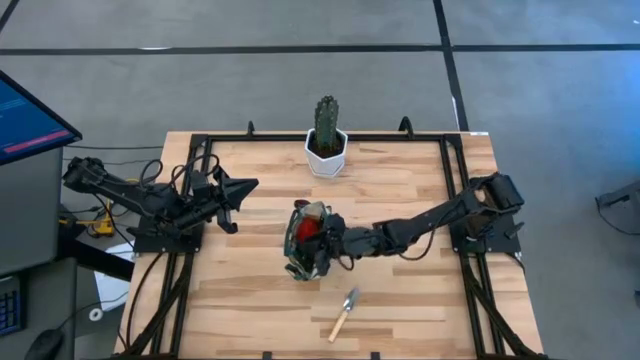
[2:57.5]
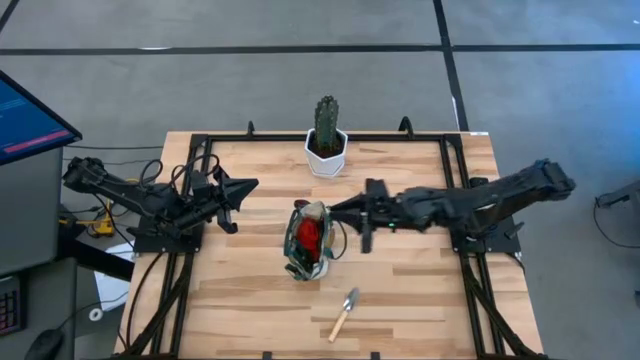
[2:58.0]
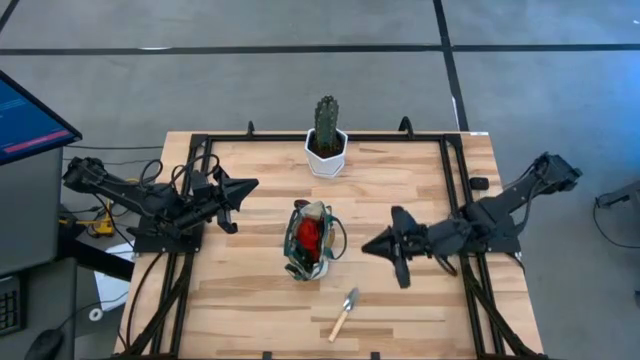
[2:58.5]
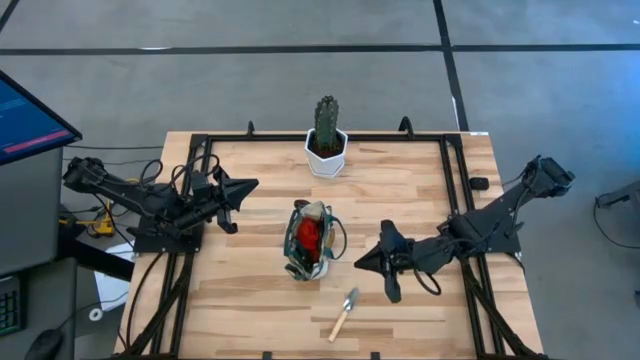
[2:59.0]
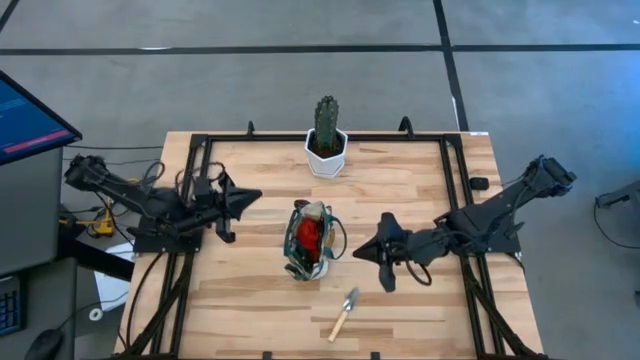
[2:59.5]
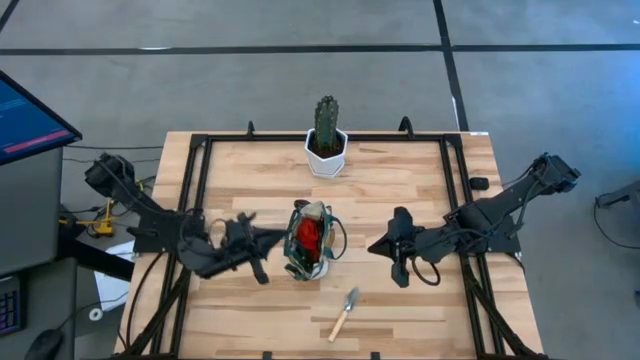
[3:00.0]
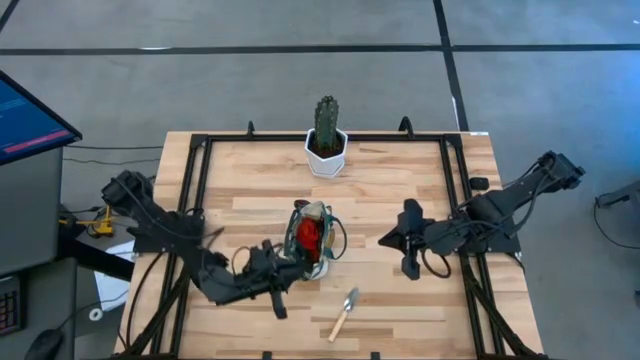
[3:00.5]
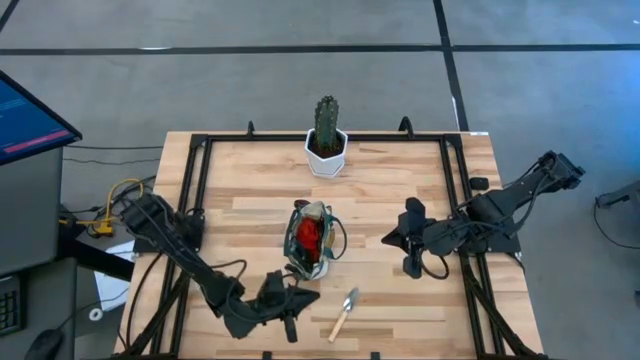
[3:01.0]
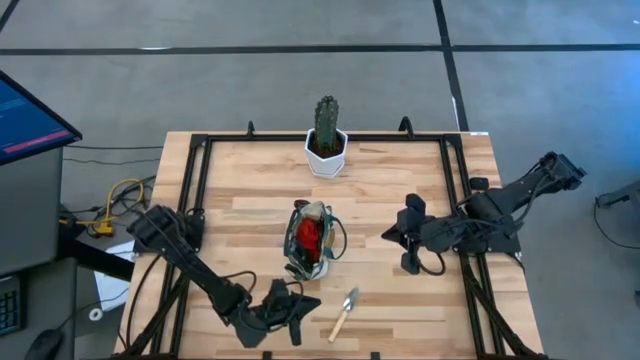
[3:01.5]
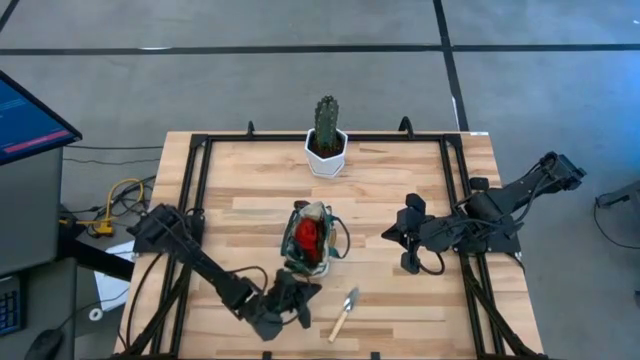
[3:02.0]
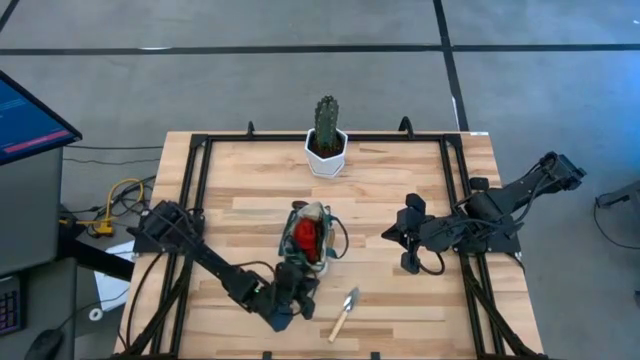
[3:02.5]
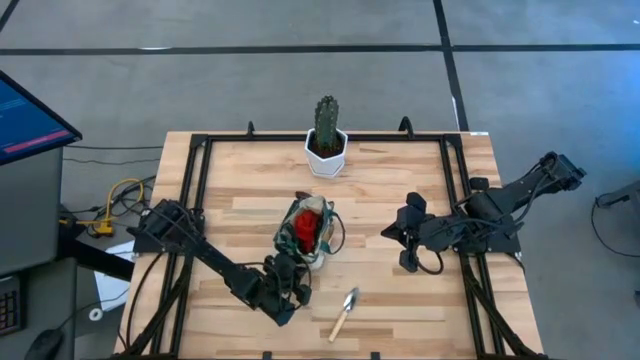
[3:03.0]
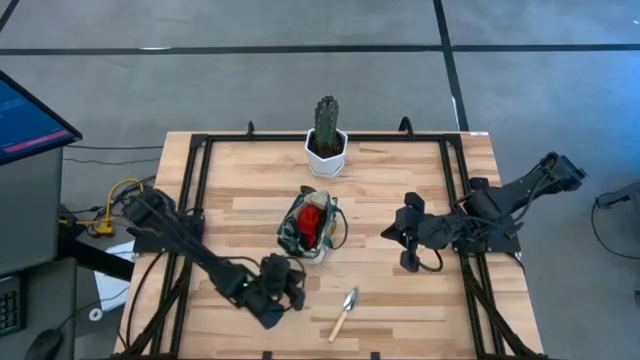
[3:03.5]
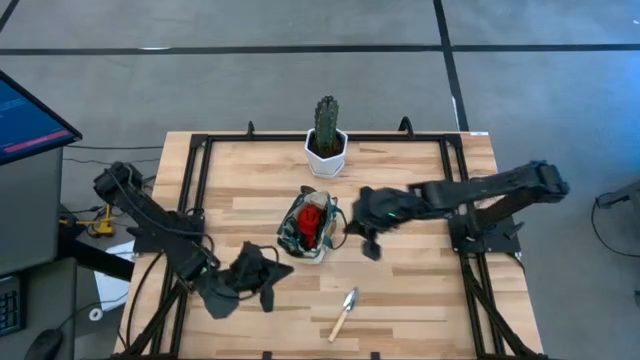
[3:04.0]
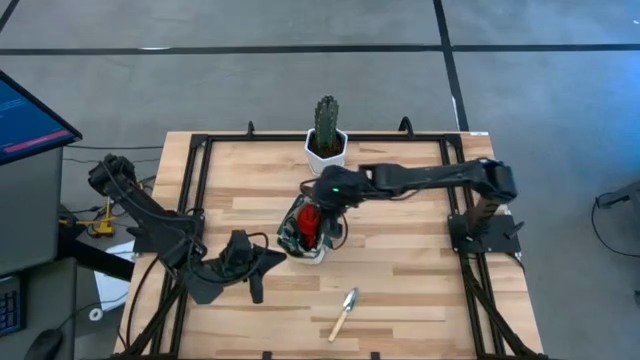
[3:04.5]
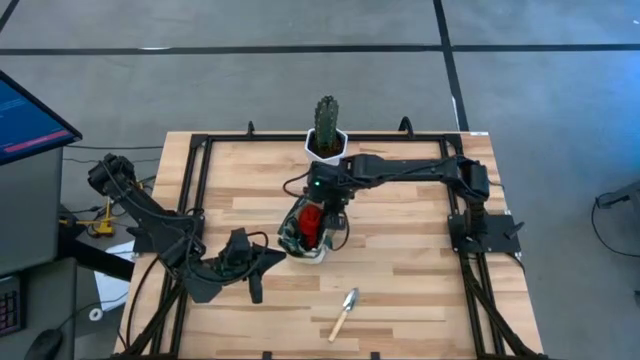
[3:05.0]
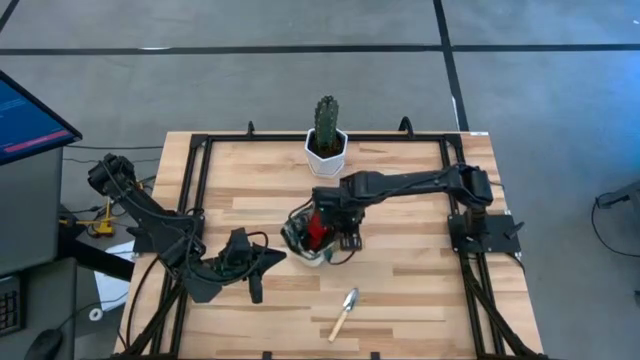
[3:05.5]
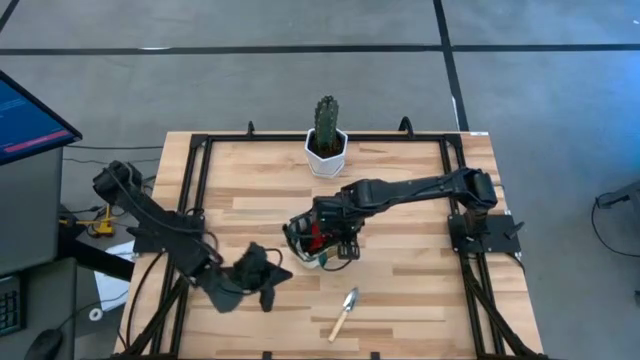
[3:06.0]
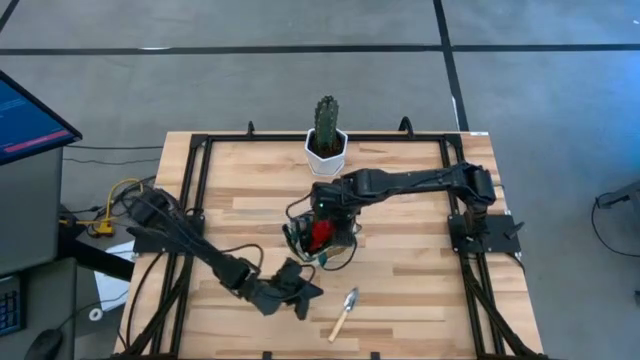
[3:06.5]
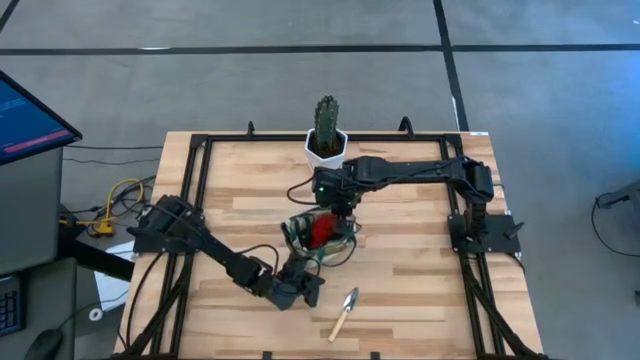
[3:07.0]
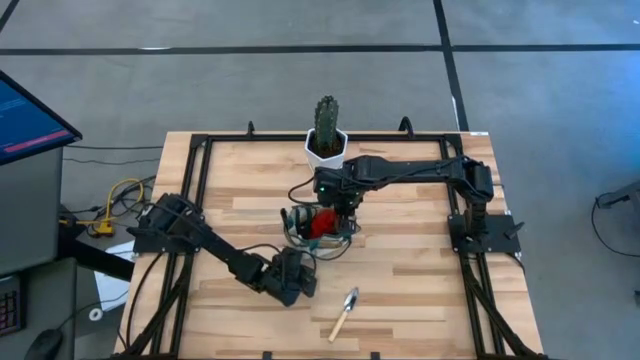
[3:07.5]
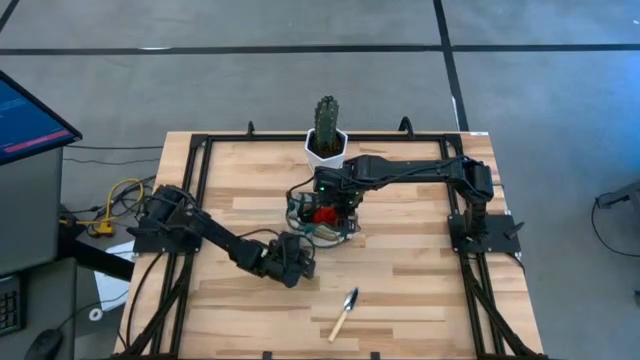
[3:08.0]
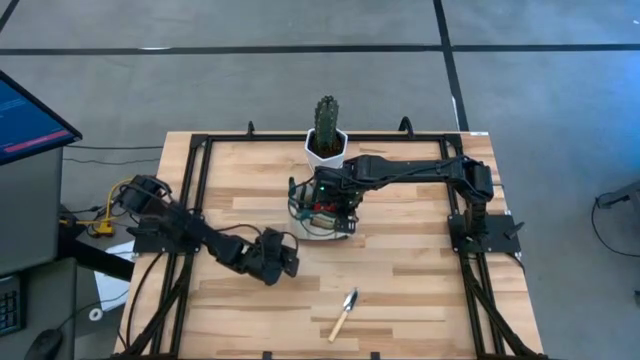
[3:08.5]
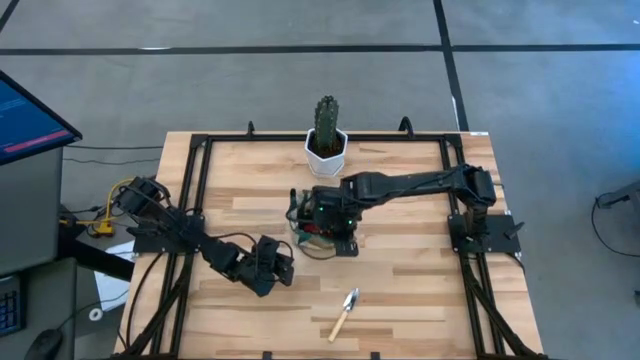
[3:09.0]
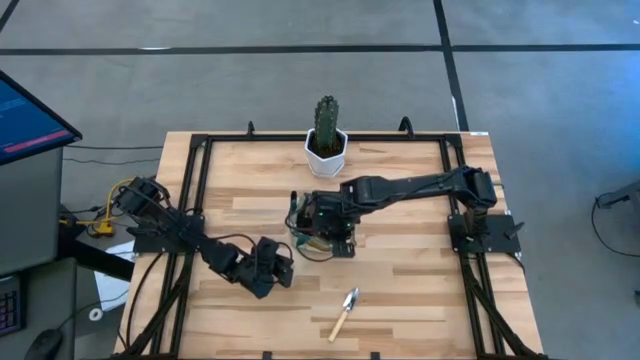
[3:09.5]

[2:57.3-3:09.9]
Task: Pick & Place Garden tools in Gardening bag
Adjust the gardening bag

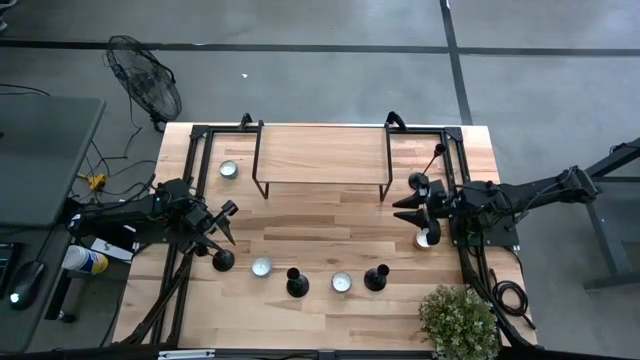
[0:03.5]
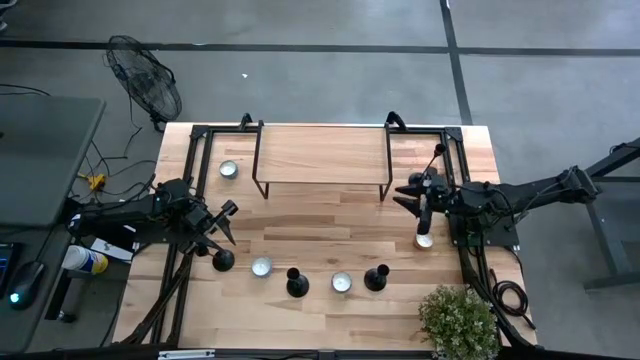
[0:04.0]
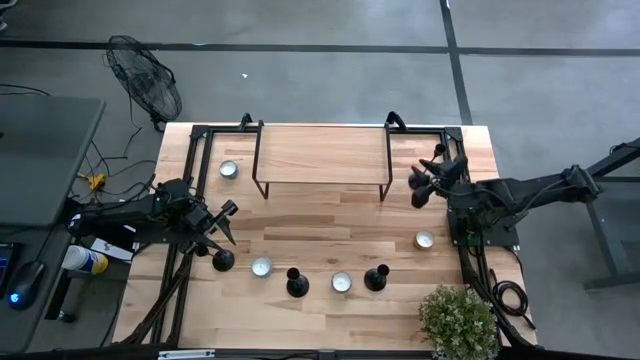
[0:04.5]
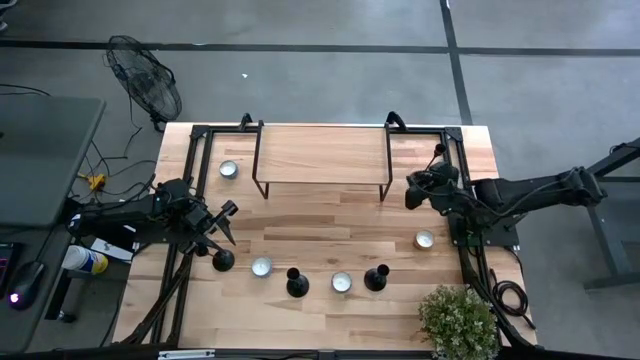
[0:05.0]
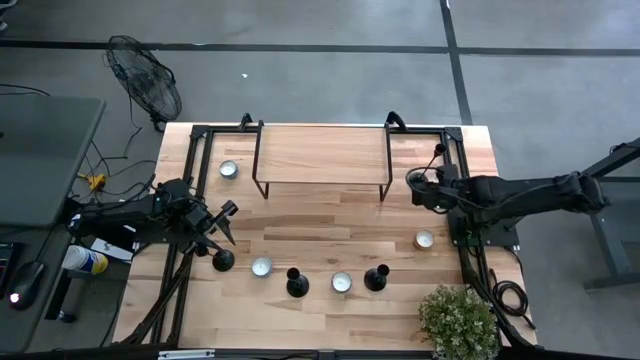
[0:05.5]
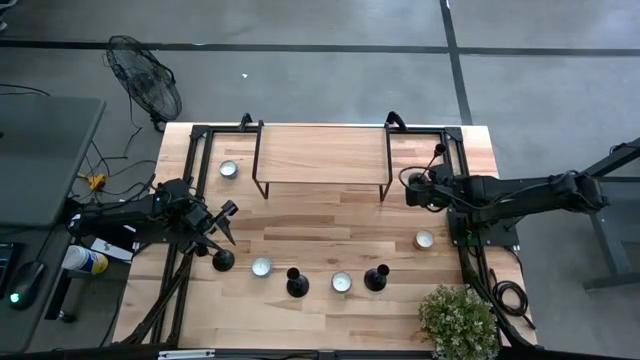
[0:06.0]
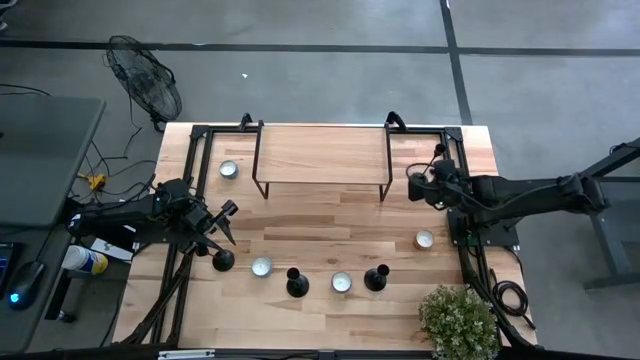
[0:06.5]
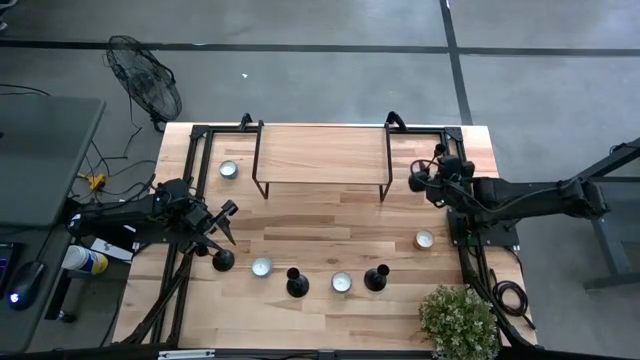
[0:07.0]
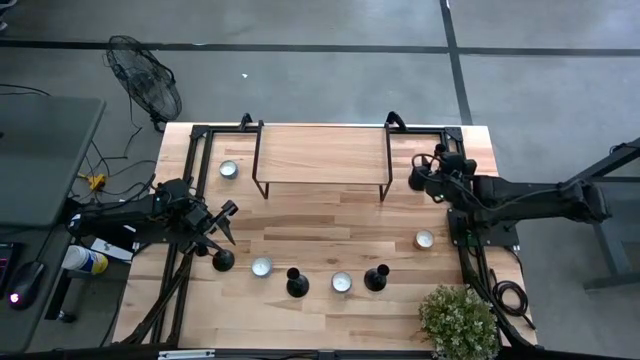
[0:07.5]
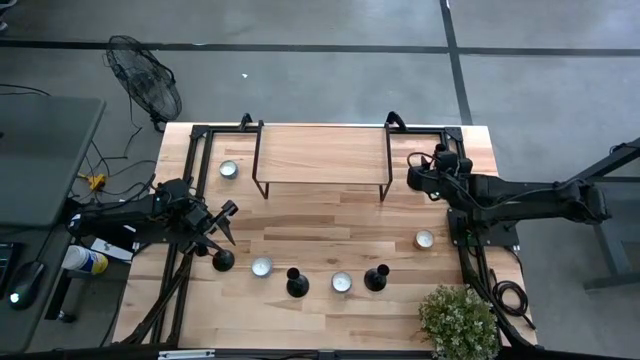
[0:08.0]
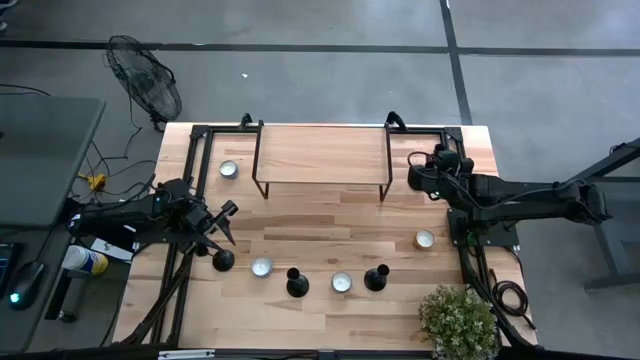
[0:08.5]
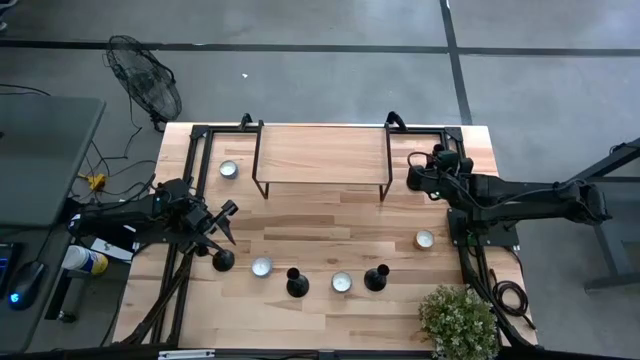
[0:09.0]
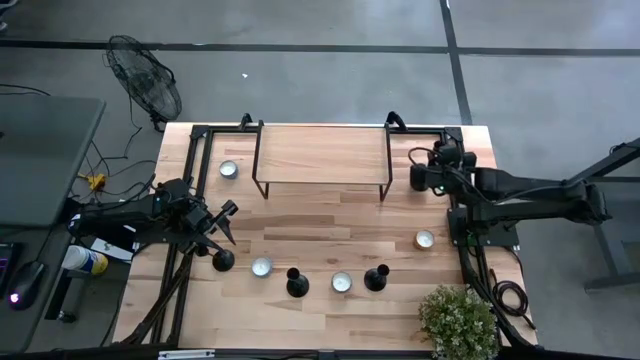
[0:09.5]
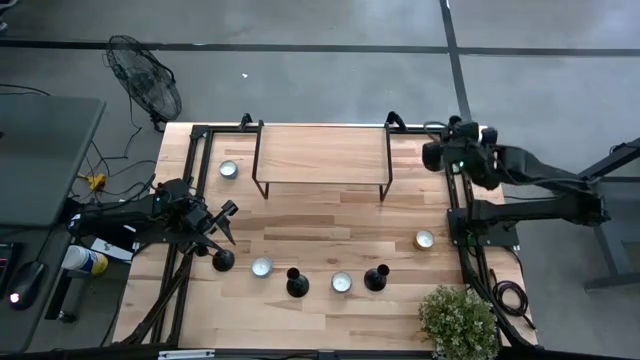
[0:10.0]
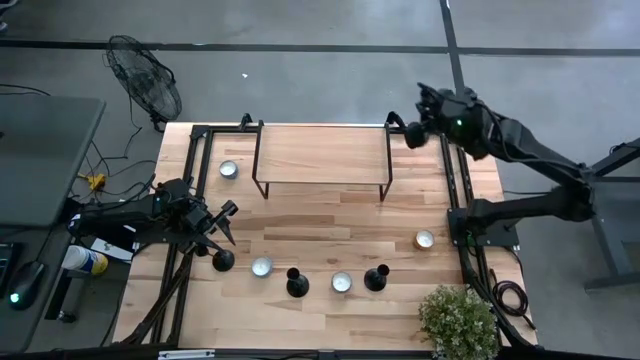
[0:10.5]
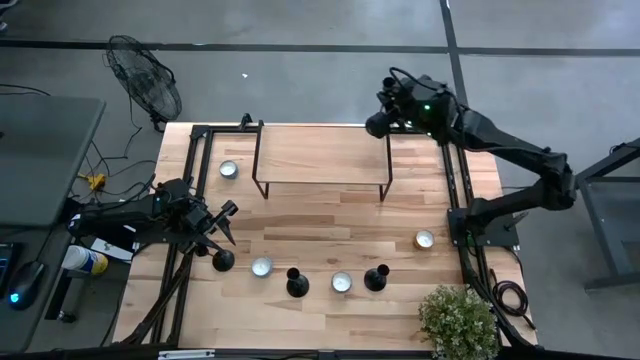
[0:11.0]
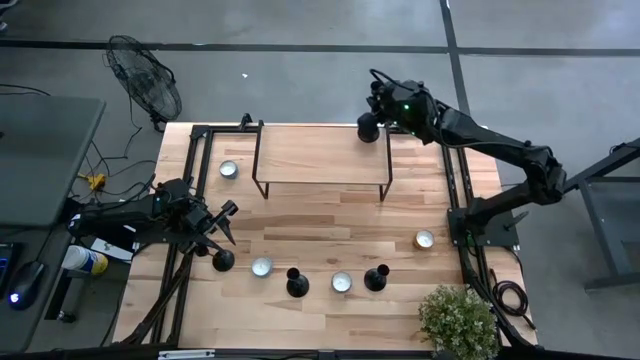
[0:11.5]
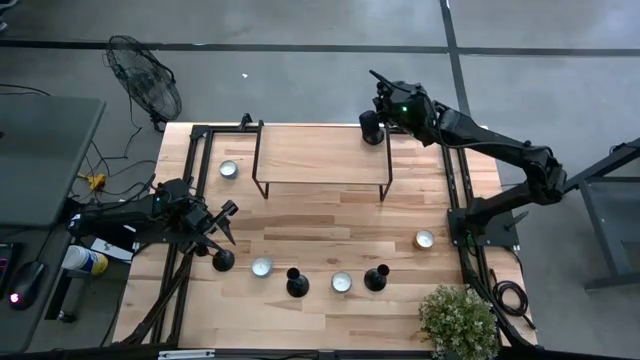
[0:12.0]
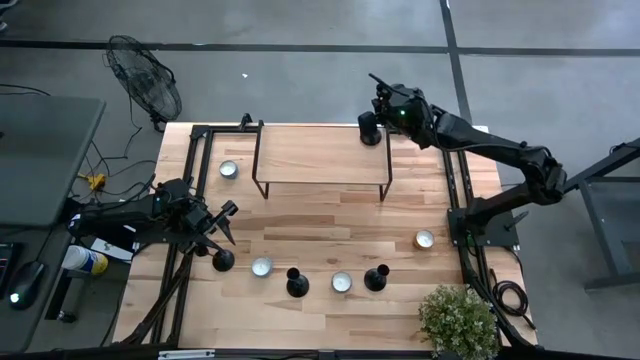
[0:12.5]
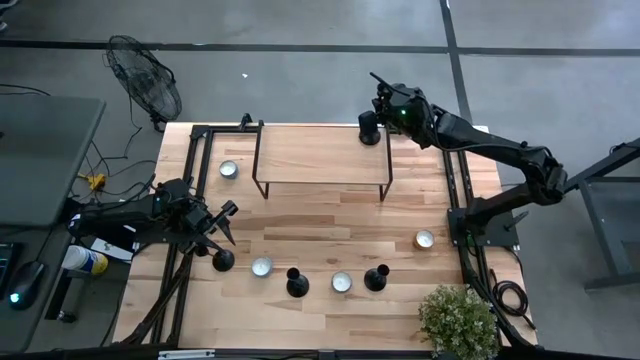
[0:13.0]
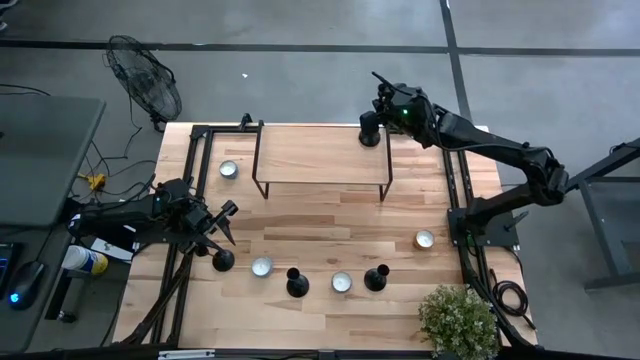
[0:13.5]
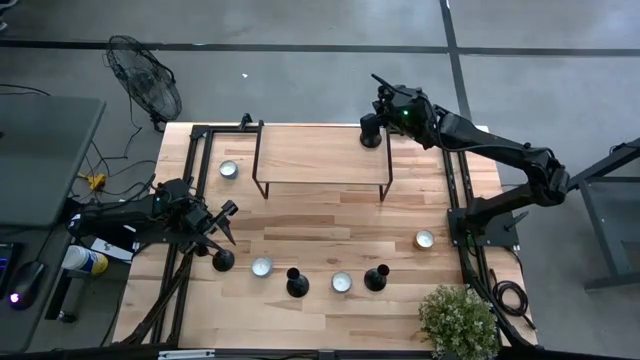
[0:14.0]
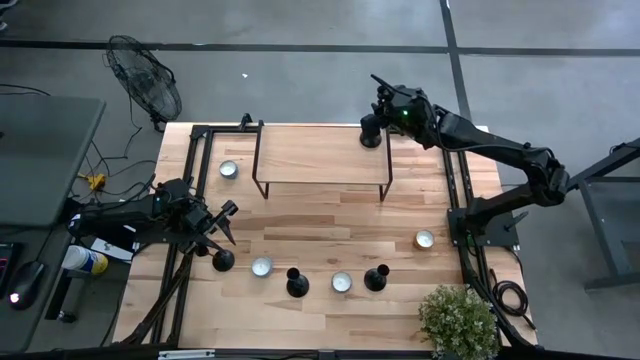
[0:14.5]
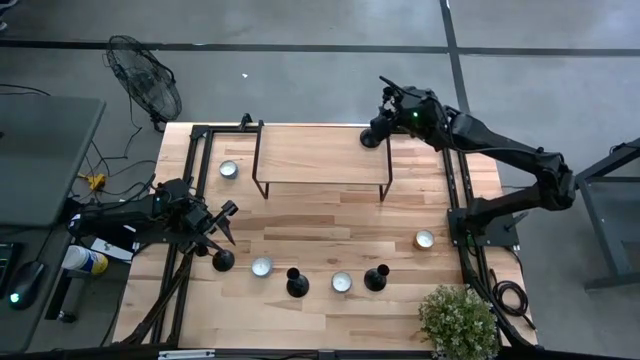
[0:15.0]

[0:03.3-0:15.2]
Task: Pick & Place candle stick holders
Put the black candle holder on the shelf
